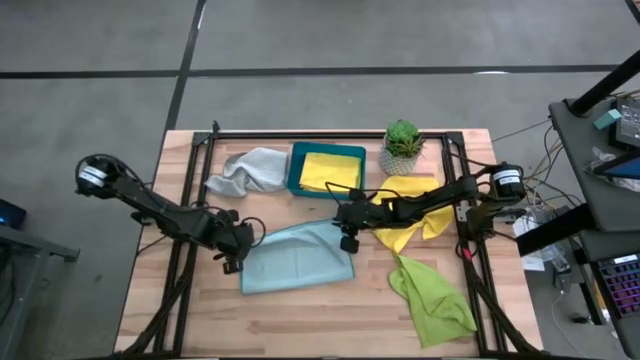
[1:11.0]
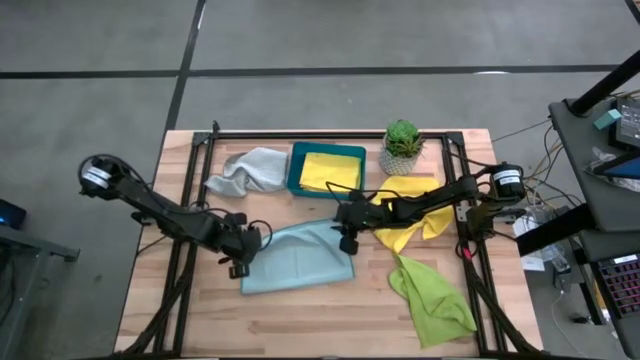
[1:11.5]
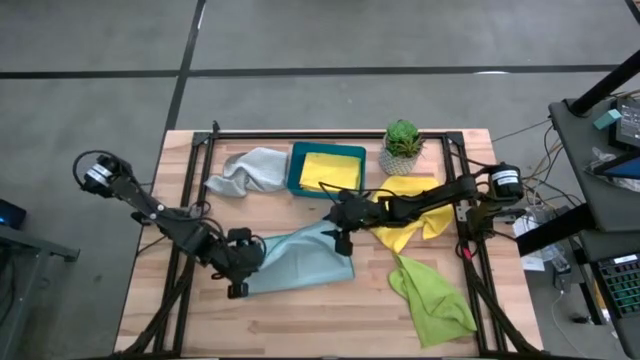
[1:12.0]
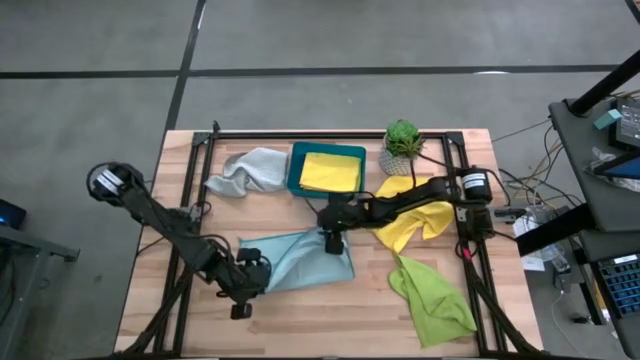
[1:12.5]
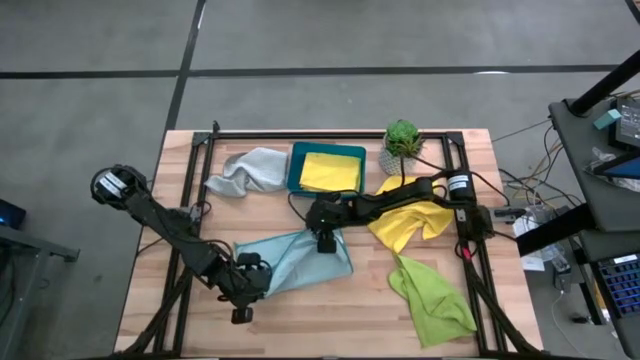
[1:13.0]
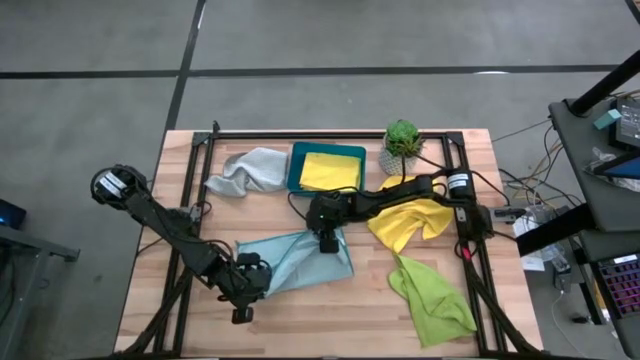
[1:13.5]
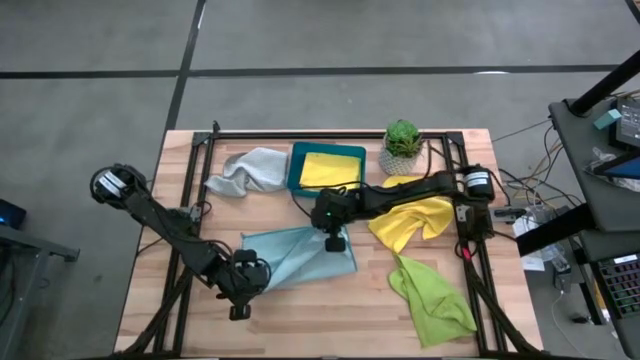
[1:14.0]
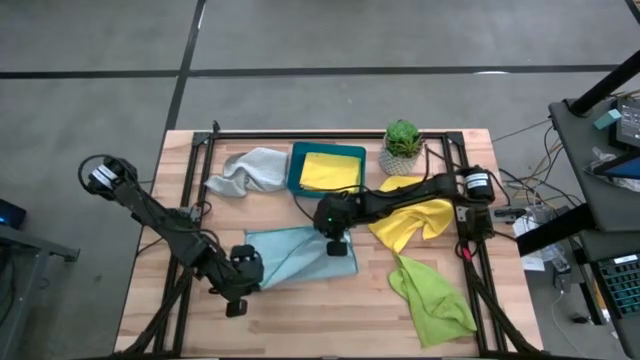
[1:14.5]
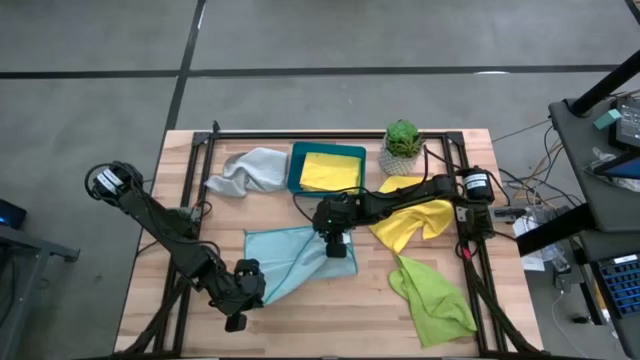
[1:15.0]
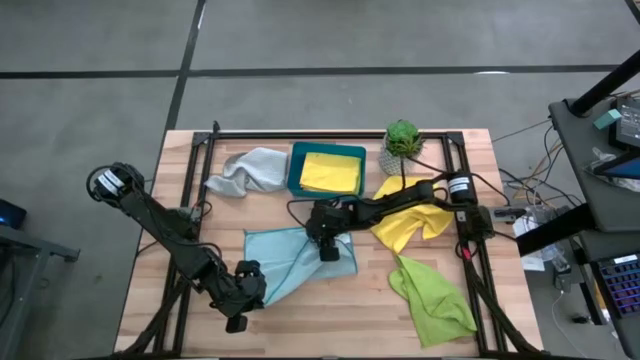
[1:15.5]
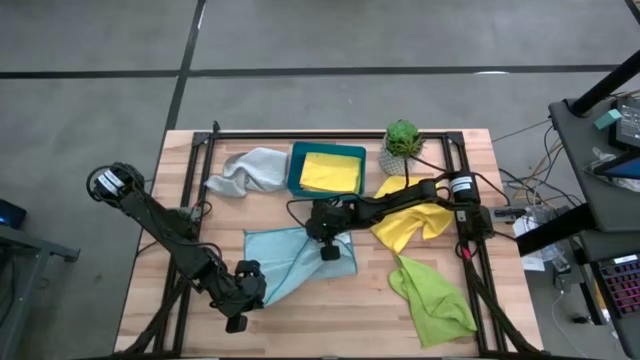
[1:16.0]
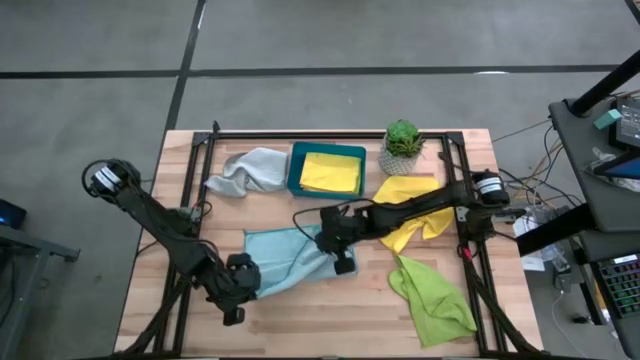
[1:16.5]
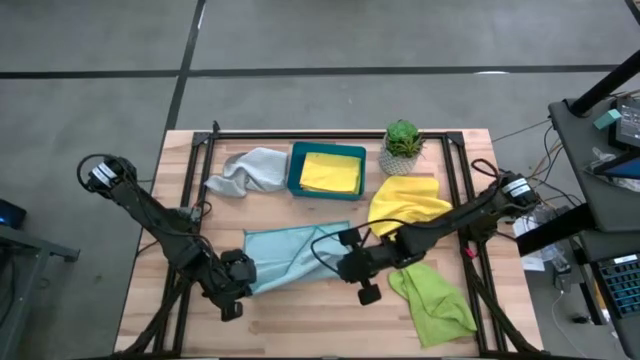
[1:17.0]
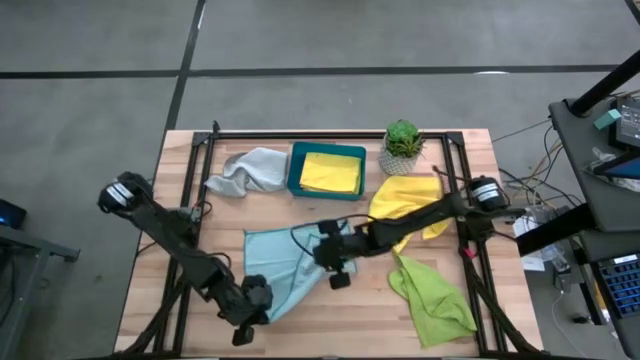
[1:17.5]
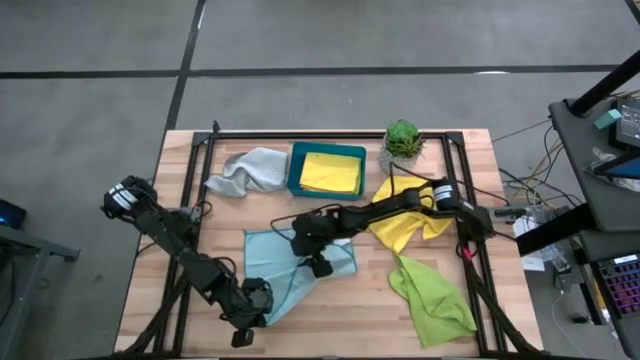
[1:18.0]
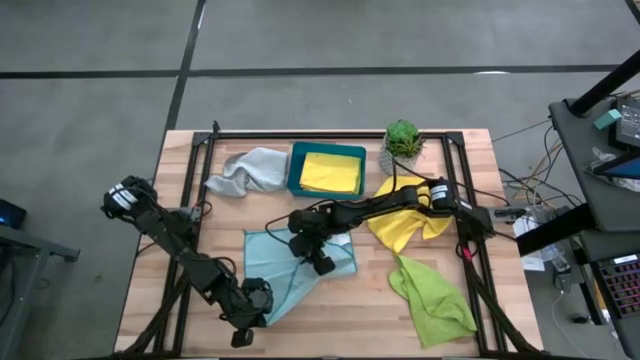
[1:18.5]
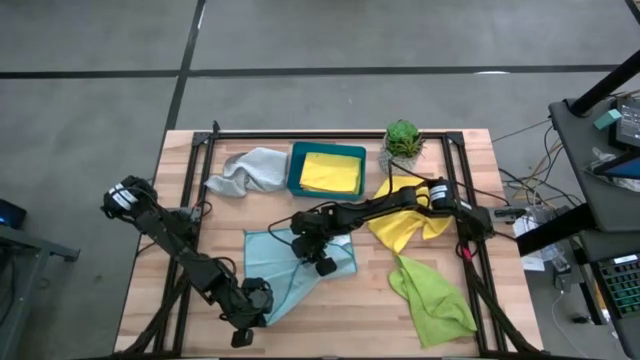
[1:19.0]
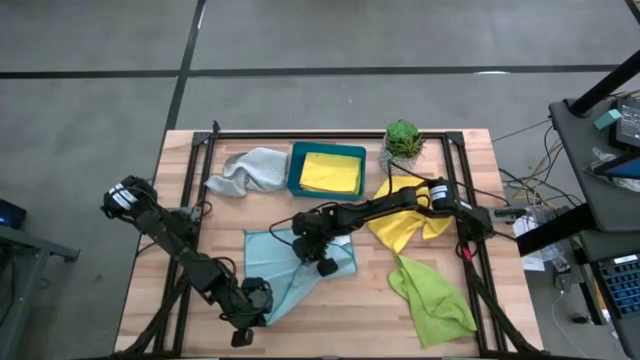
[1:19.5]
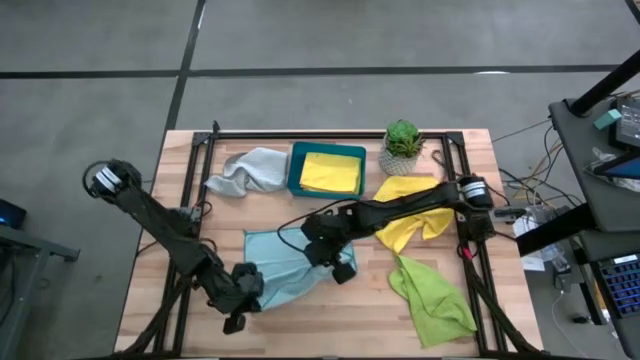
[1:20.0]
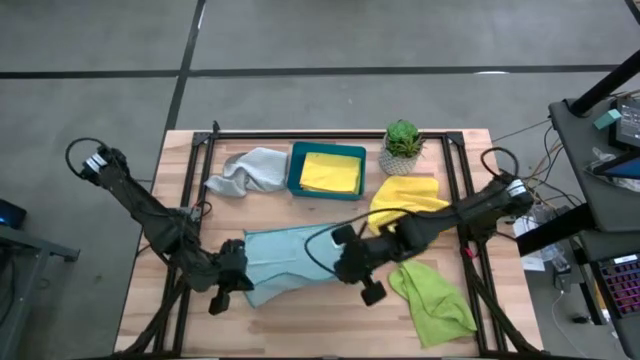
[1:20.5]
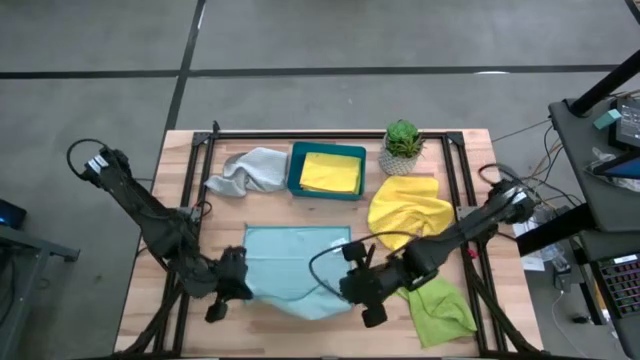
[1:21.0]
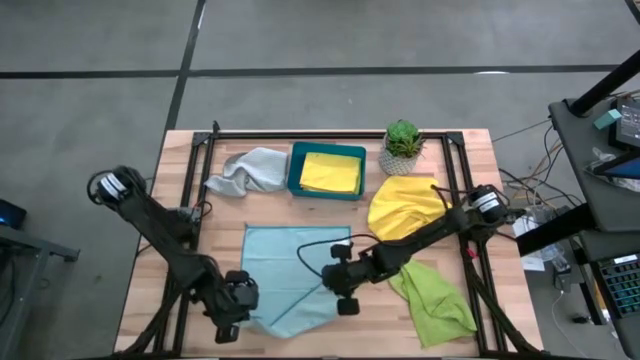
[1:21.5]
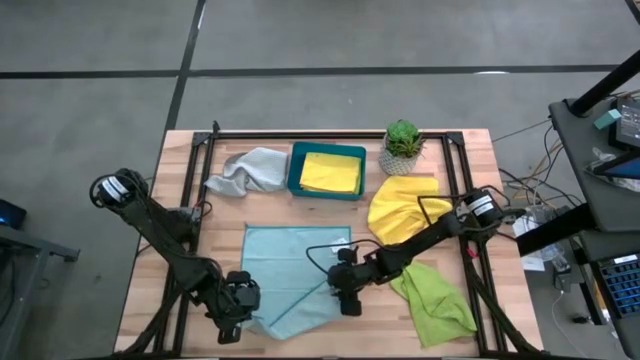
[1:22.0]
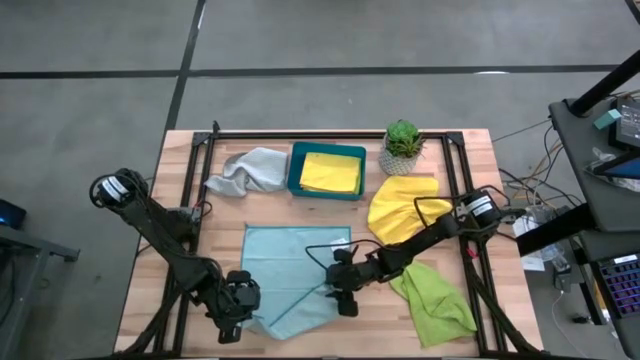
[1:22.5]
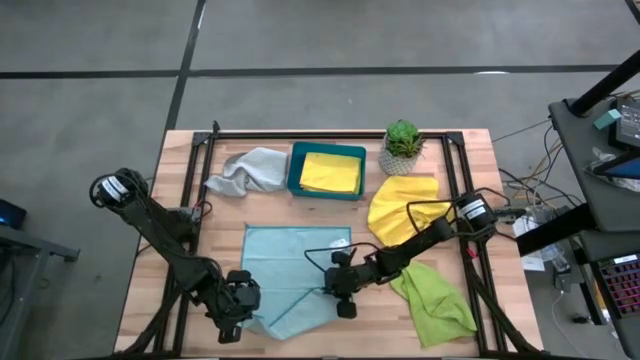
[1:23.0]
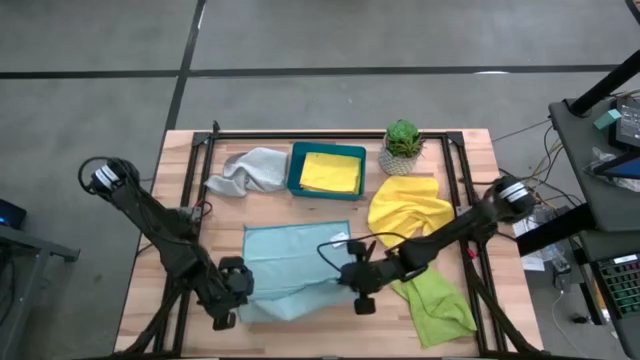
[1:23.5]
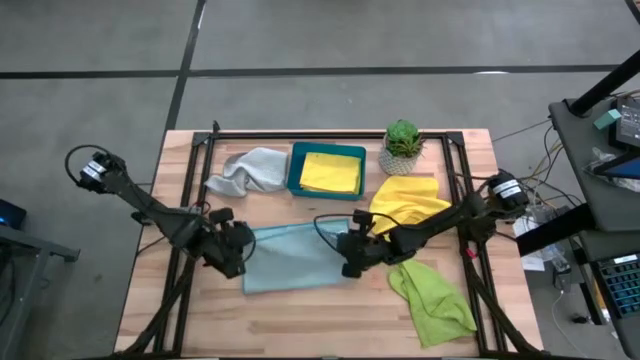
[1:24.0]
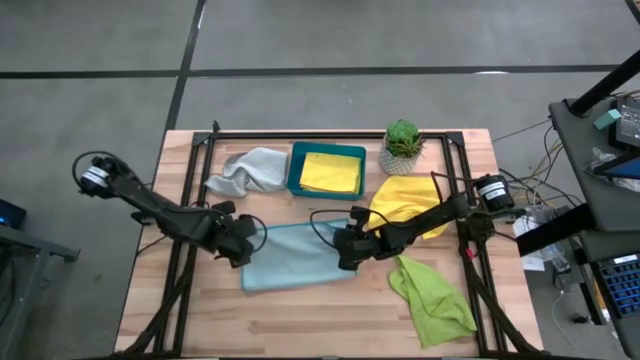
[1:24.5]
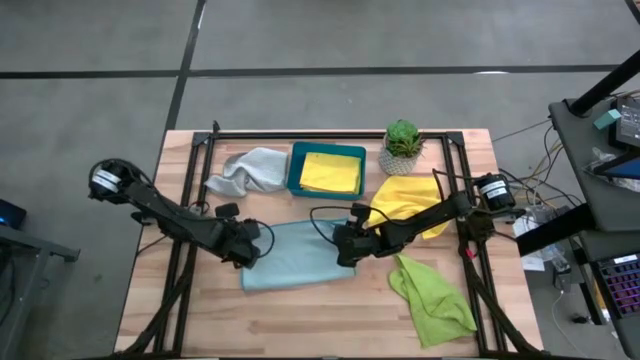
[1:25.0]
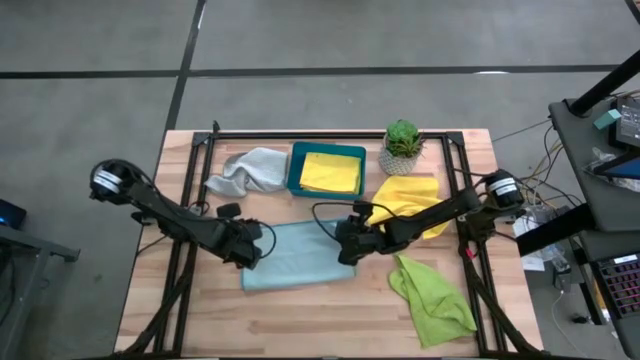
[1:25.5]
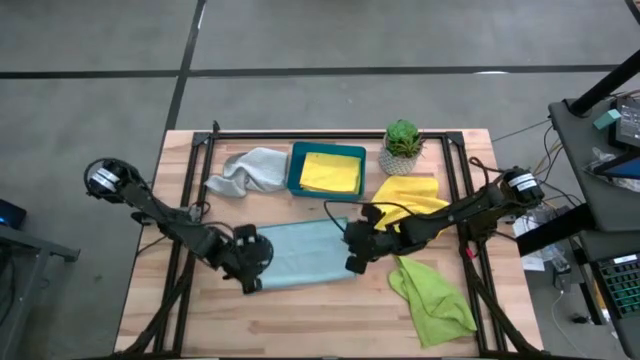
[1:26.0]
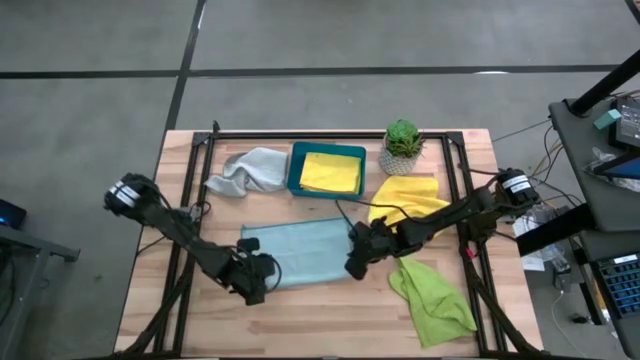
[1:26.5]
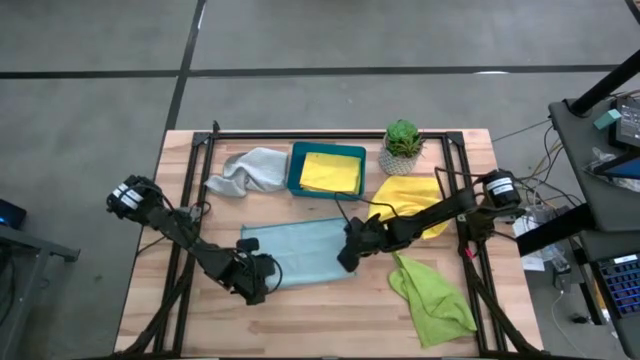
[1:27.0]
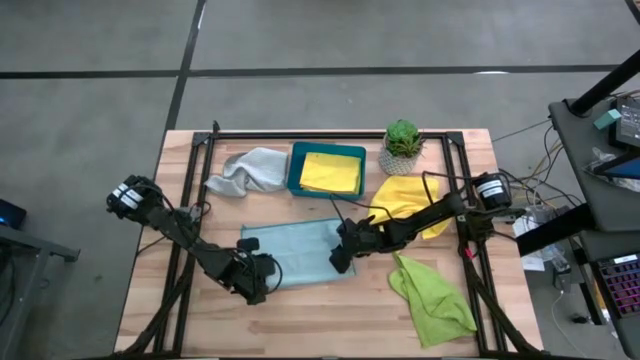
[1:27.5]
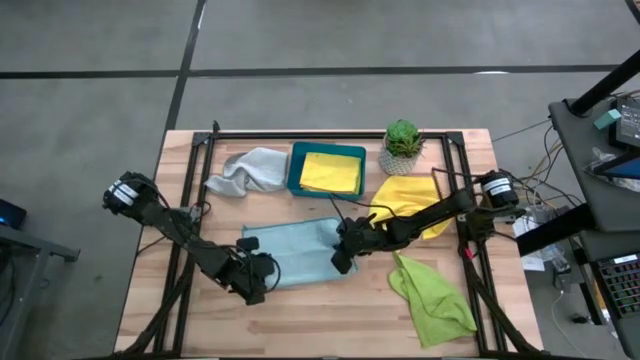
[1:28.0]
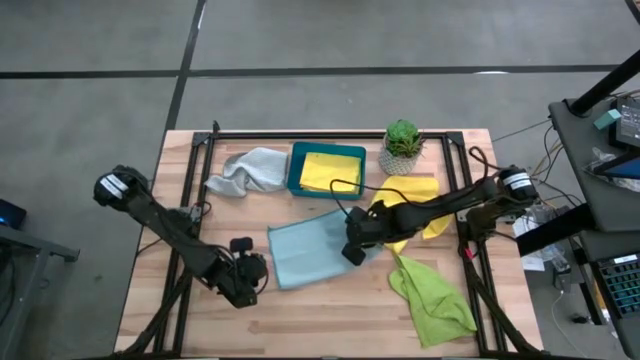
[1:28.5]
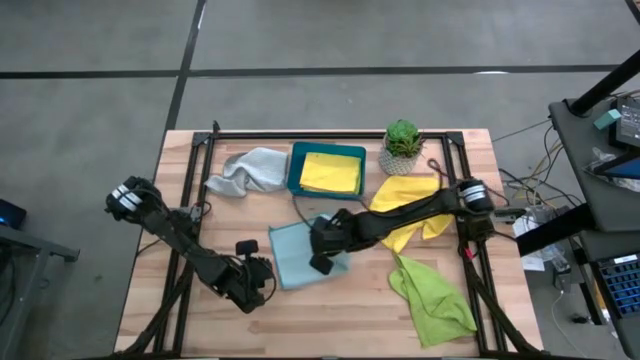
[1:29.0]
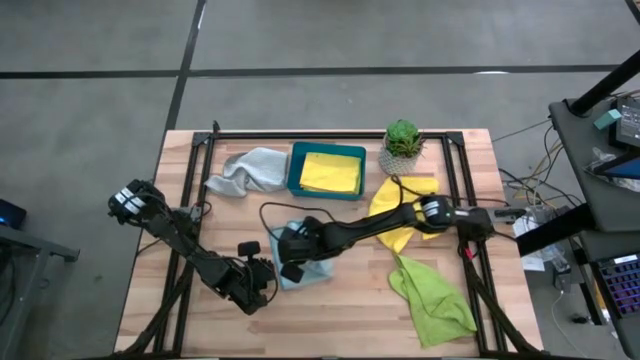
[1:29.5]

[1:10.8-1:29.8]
Task: Fold microfiber towels
Fold the light blue microfiber cloth
